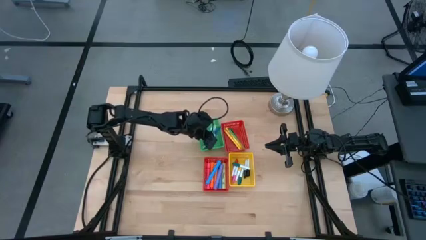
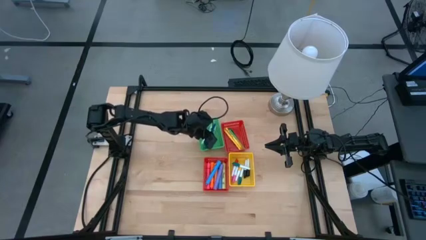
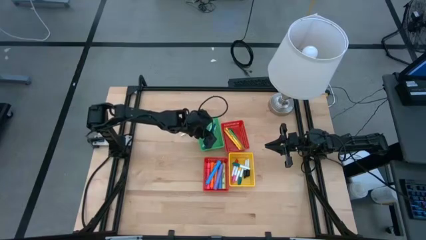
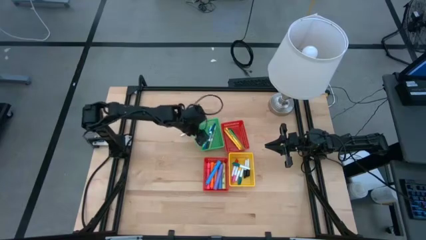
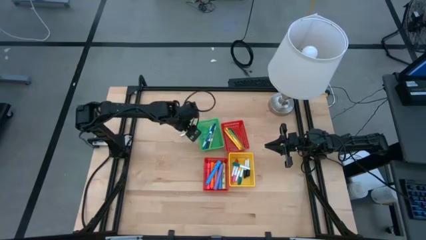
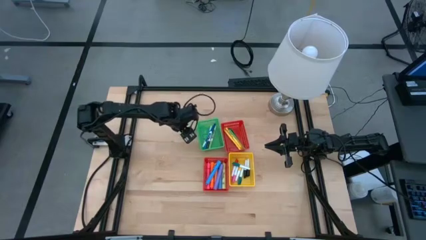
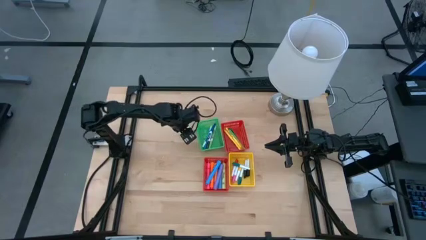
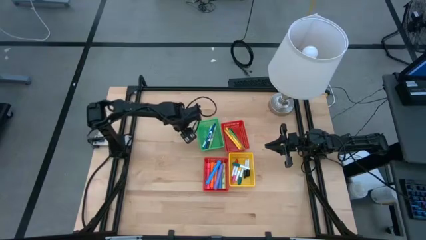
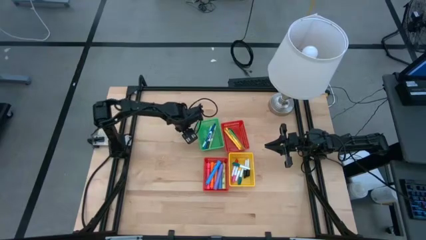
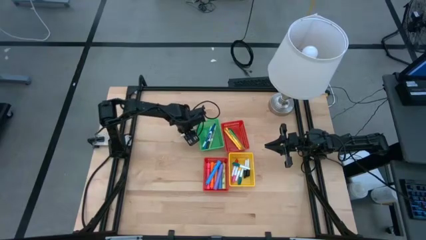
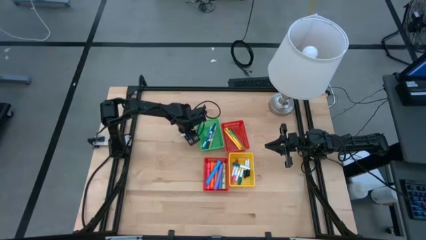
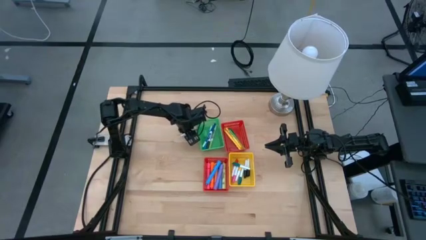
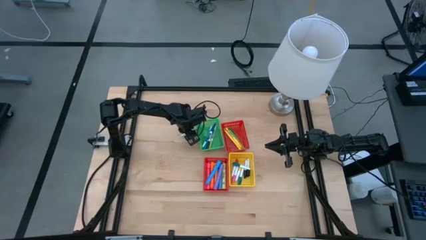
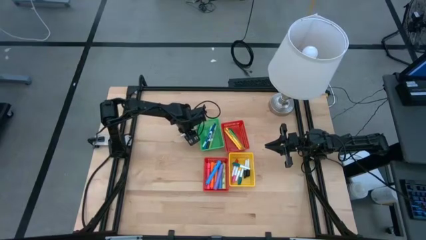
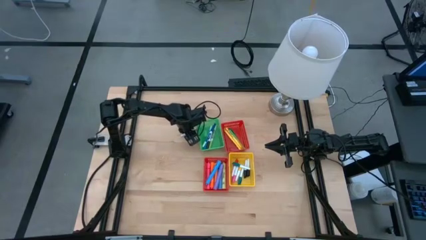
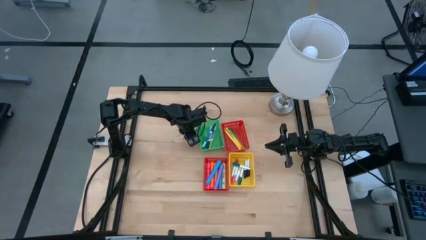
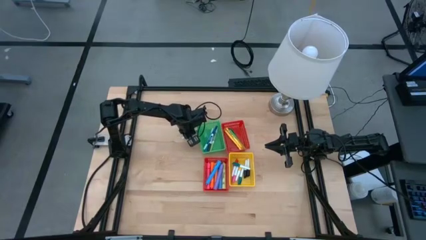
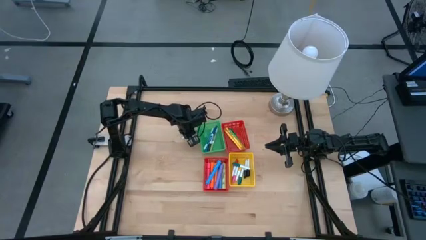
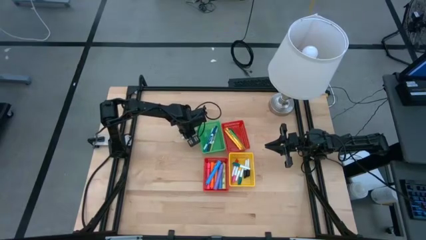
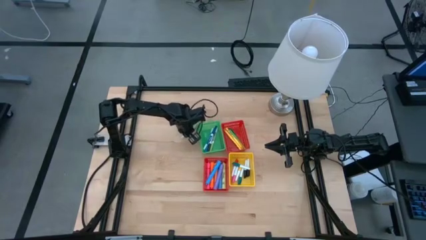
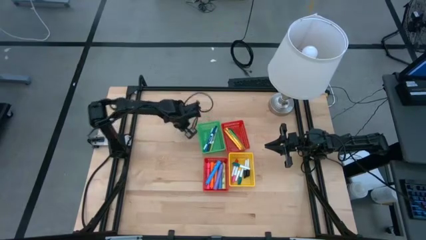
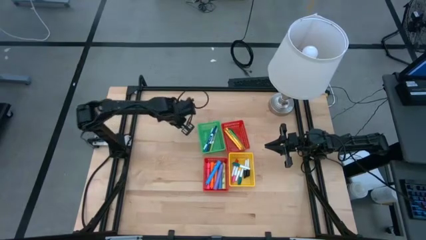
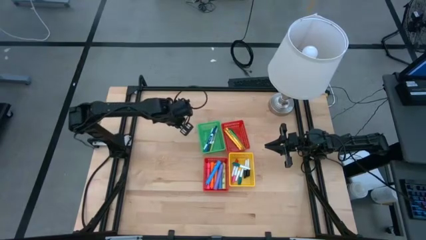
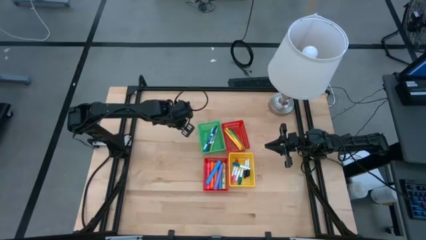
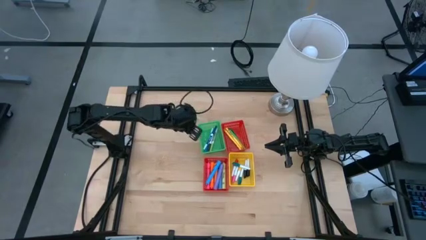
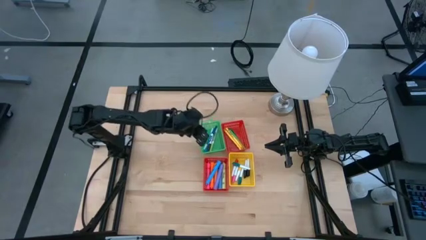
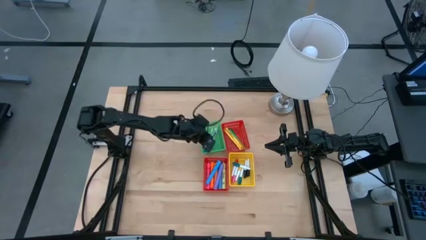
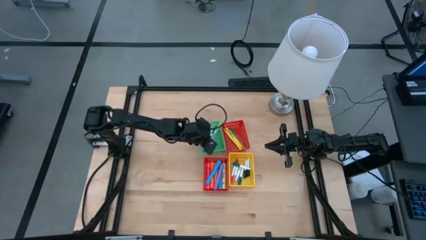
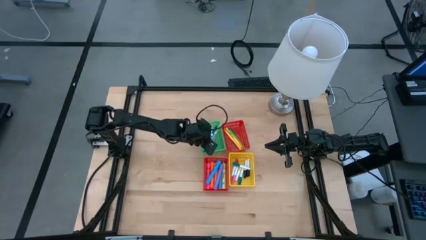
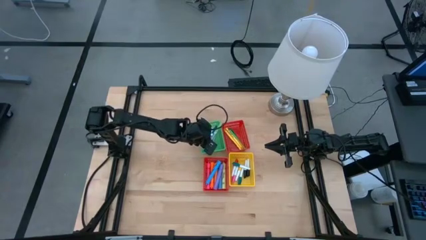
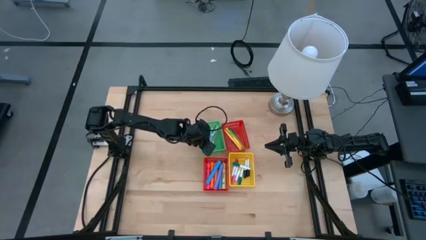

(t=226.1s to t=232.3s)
Task: Pick & Place Markers
Put the green marker pen into the green bin

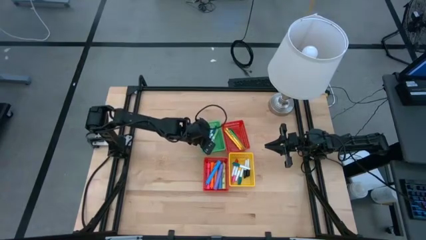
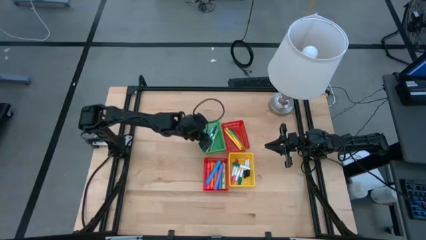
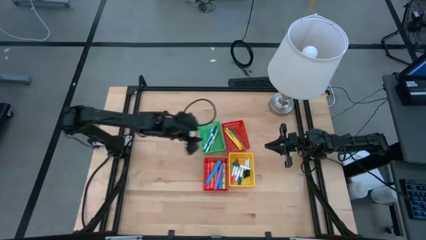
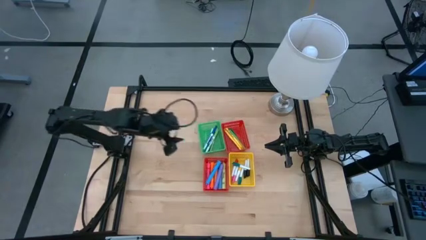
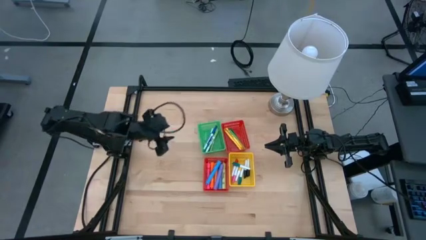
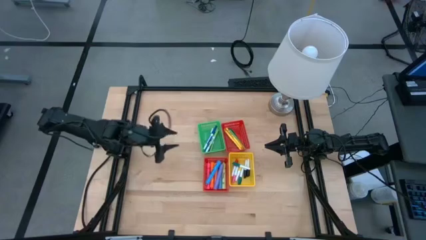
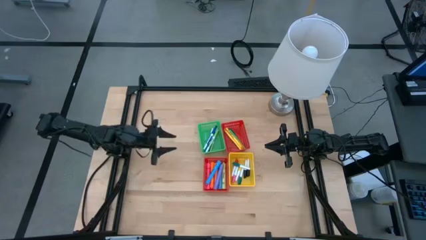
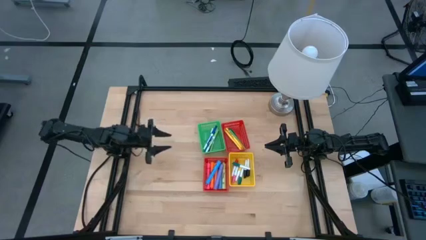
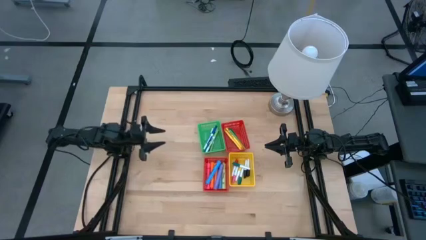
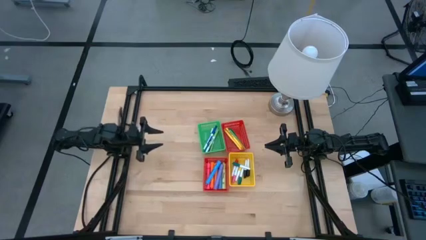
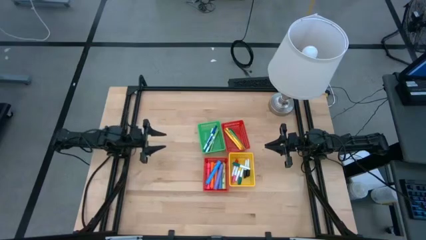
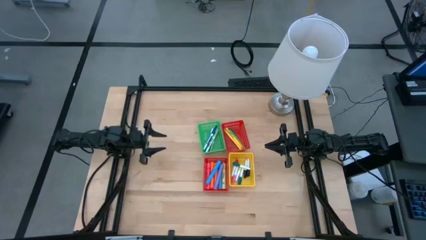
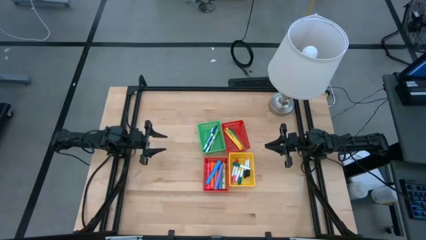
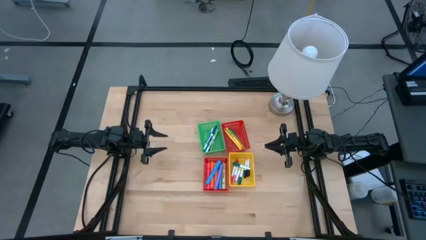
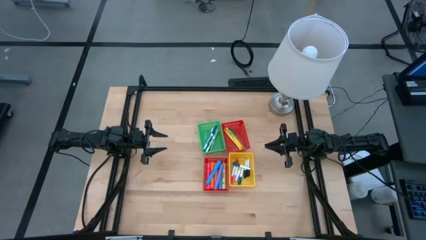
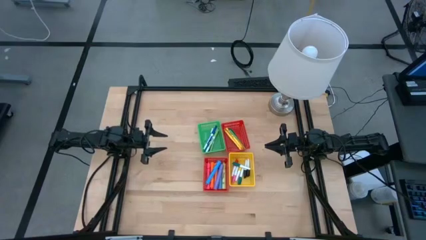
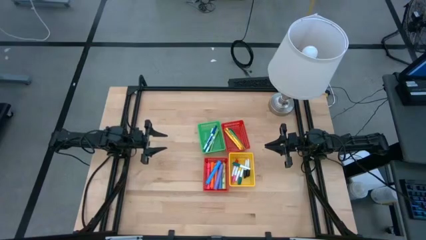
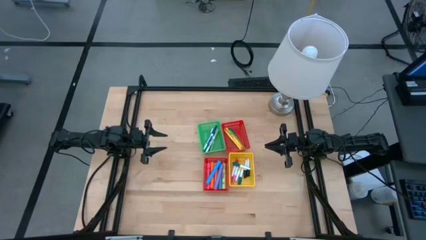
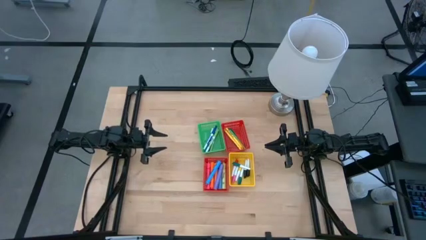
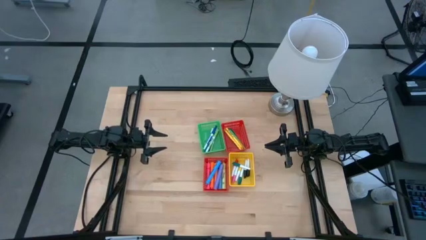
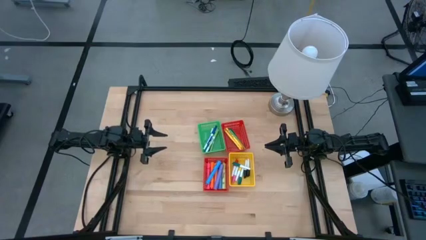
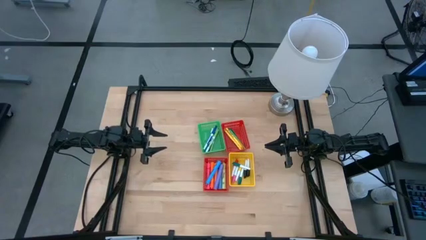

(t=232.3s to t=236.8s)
Return to Home Position
